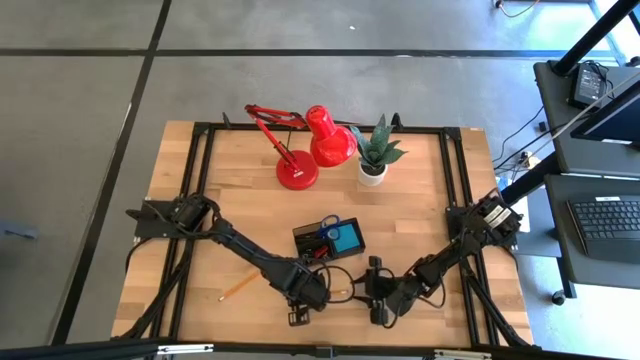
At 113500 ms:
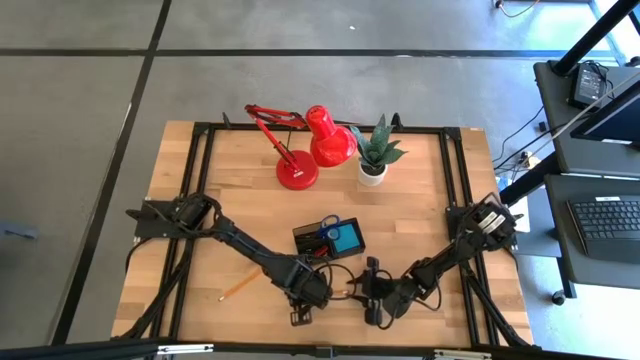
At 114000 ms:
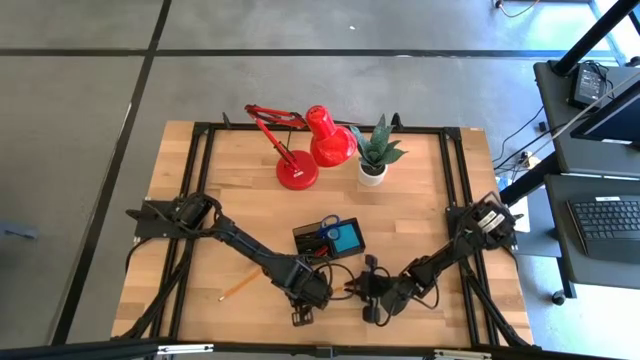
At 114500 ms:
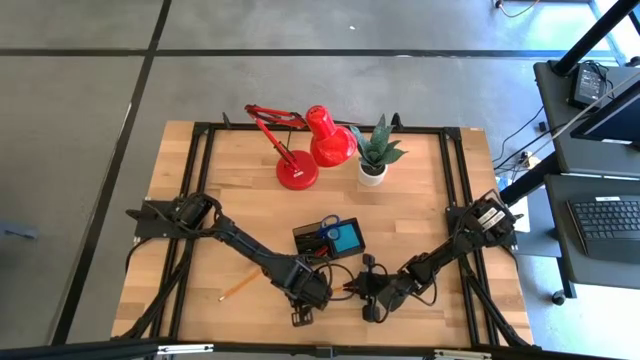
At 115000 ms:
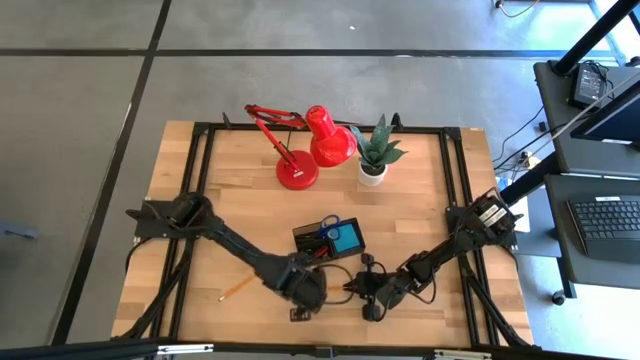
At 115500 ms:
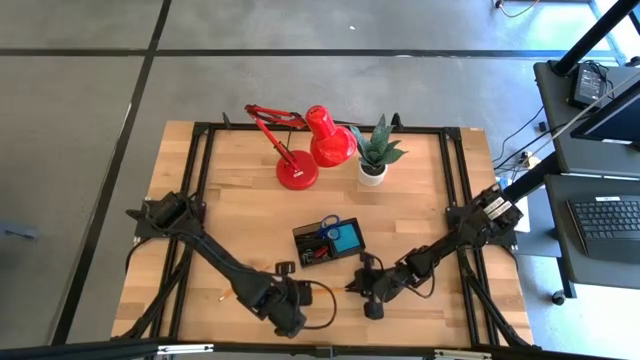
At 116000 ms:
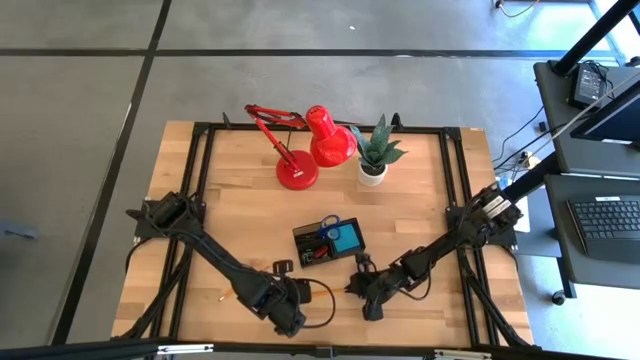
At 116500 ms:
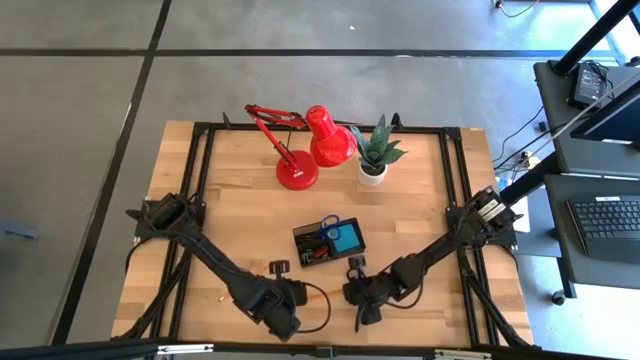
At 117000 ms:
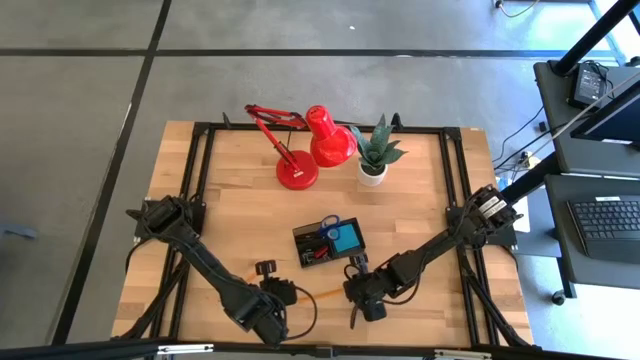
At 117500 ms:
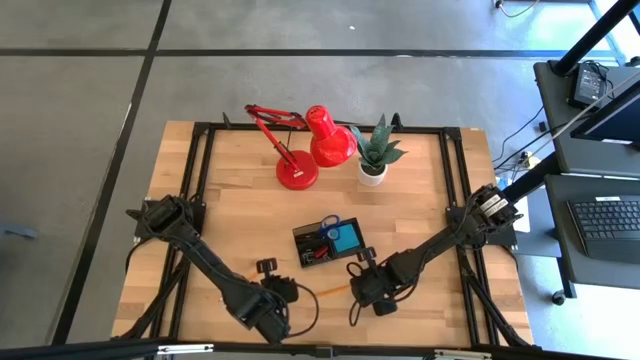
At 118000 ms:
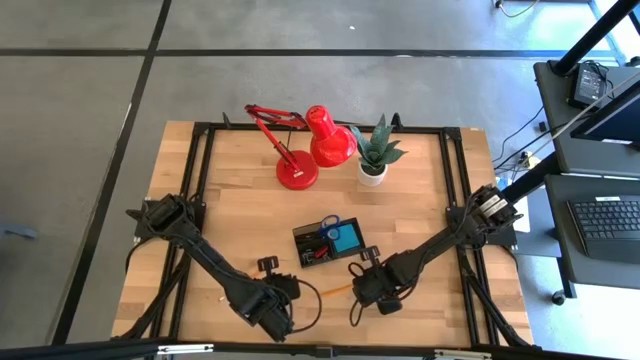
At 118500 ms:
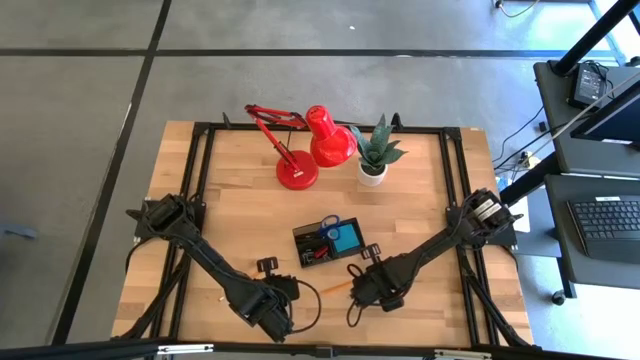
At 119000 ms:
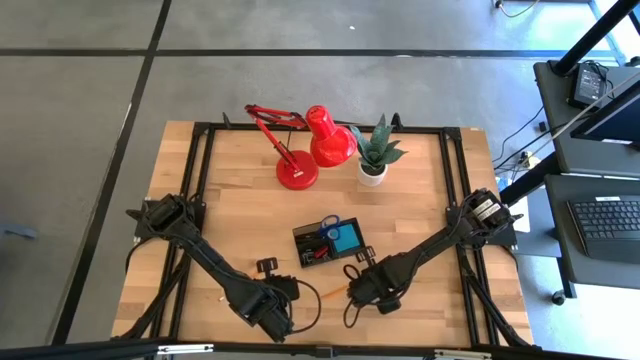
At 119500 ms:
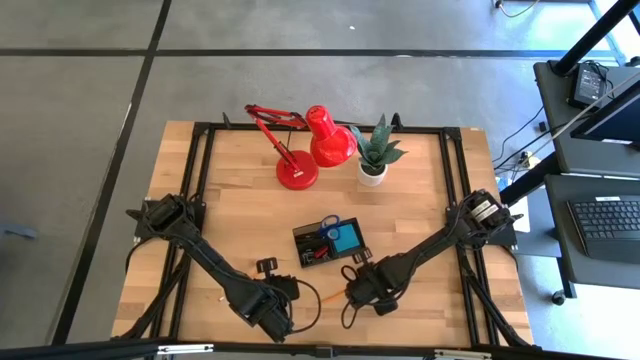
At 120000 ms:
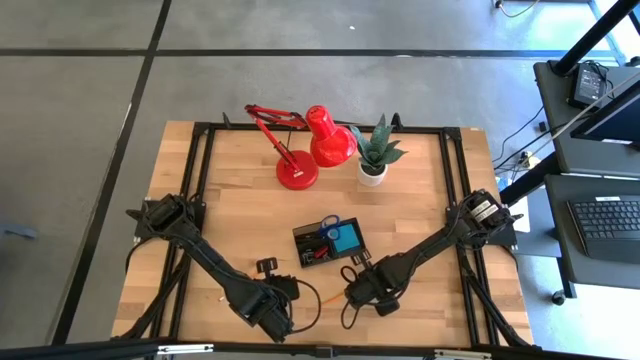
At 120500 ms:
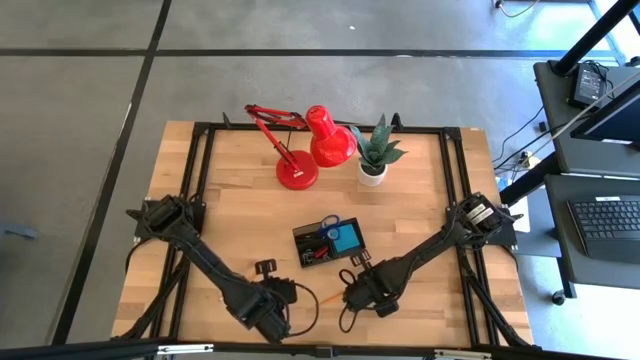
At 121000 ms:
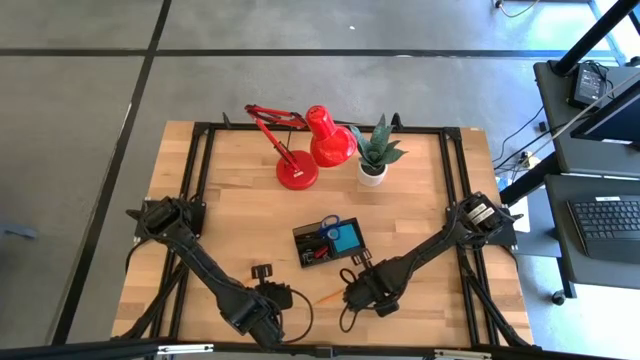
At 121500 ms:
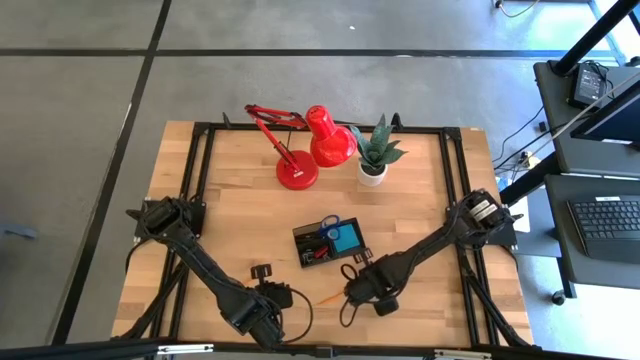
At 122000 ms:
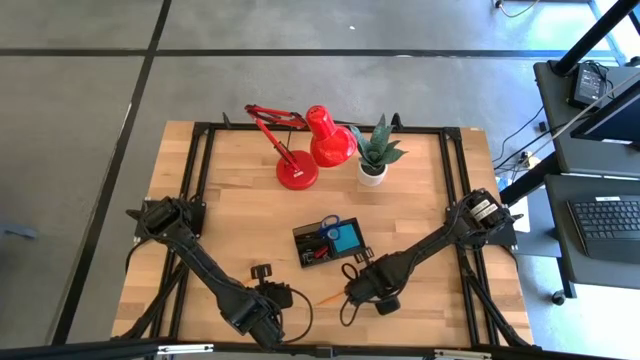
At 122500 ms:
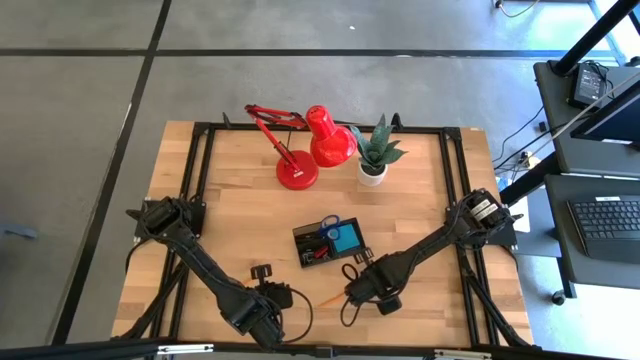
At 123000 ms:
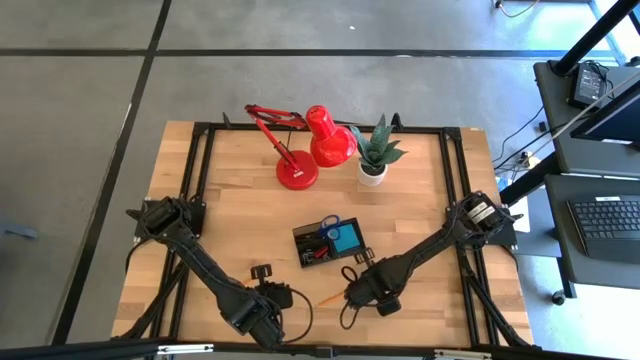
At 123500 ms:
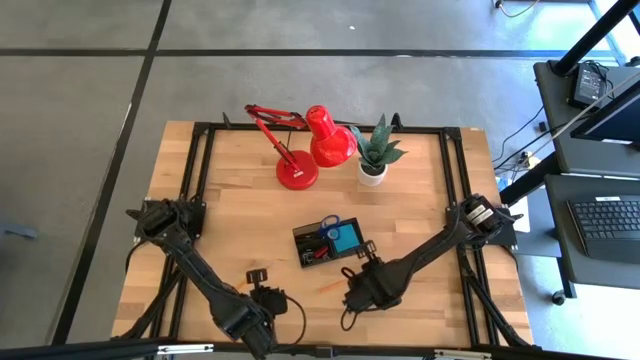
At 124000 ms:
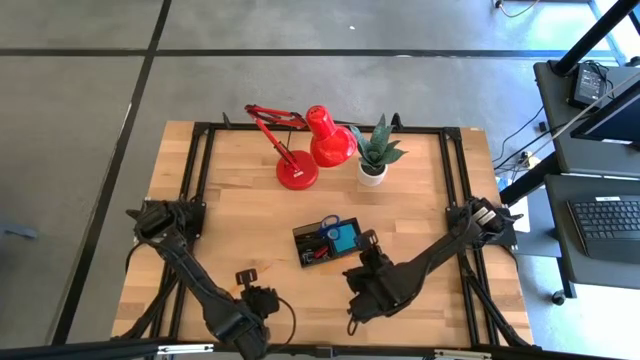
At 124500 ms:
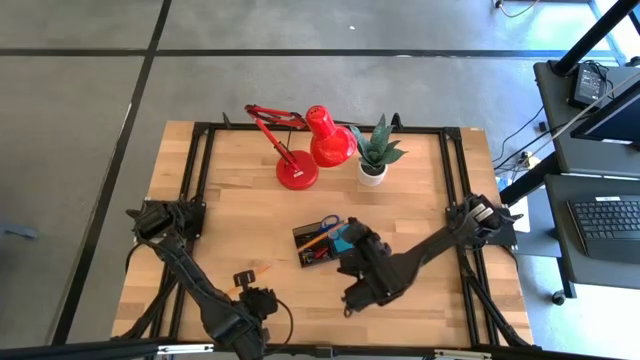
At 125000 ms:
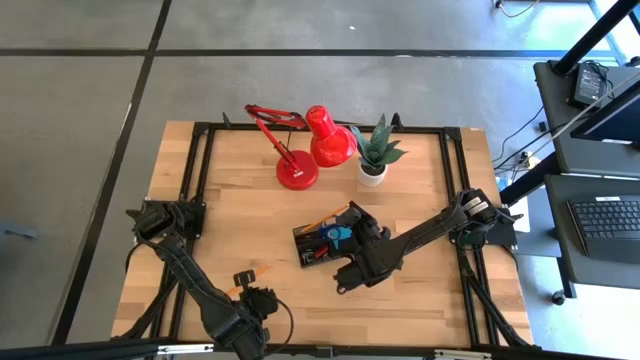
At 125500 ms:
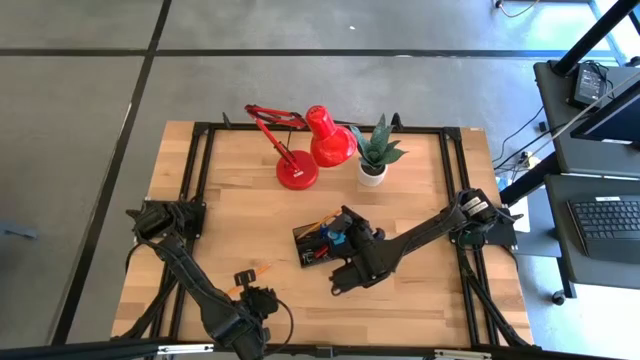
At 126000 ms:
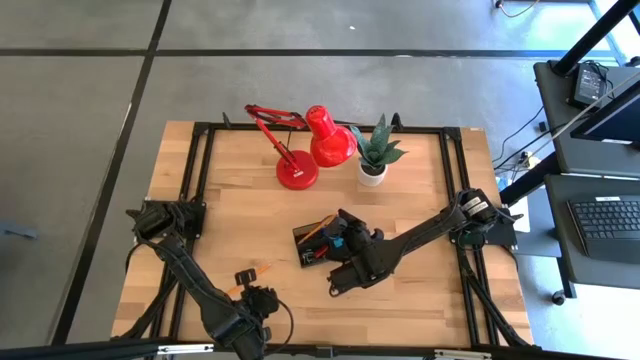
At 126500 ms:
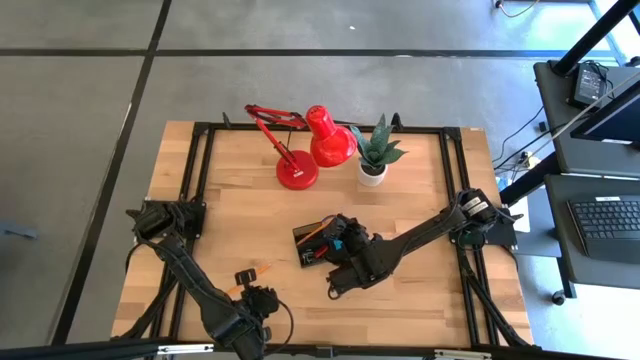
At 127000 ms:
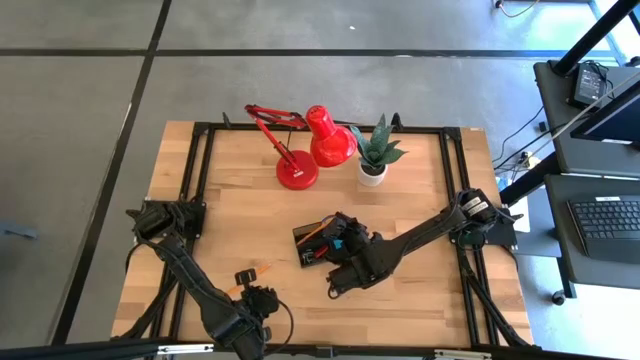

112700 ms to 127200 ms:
Task: Pick and place office supplies into organizer
Put the top yellow pencil into the black desk organizer

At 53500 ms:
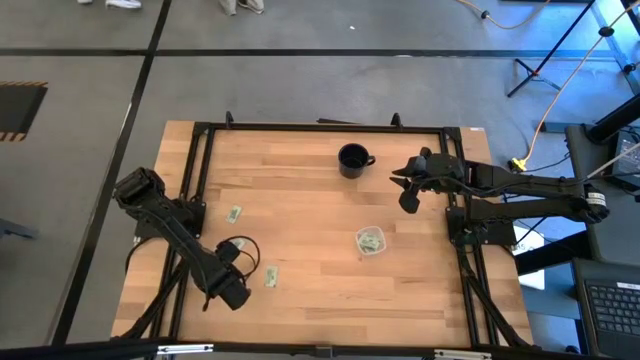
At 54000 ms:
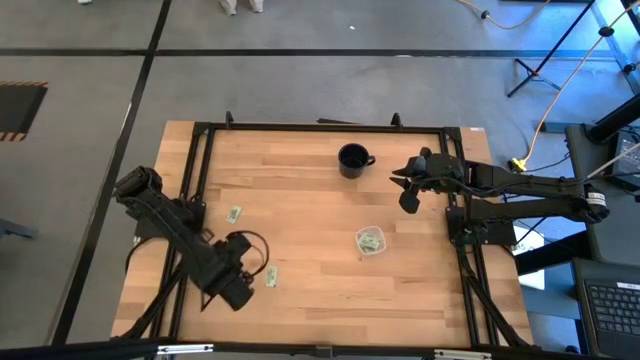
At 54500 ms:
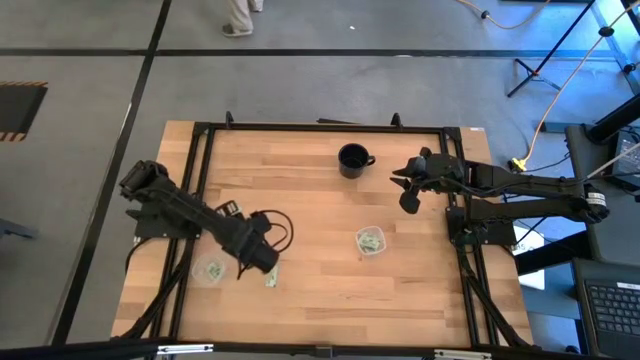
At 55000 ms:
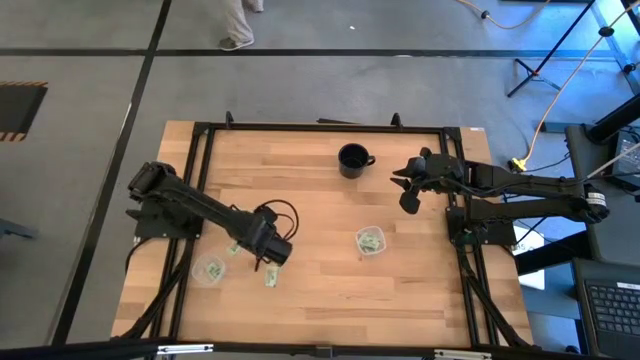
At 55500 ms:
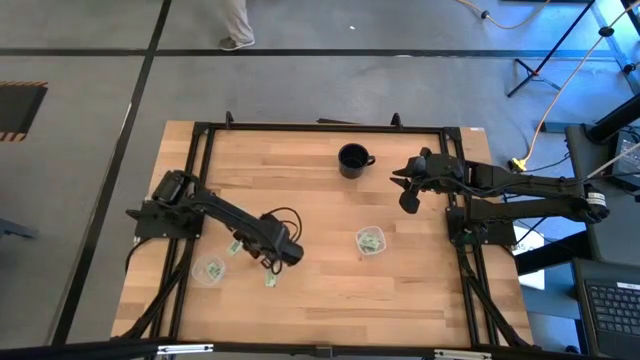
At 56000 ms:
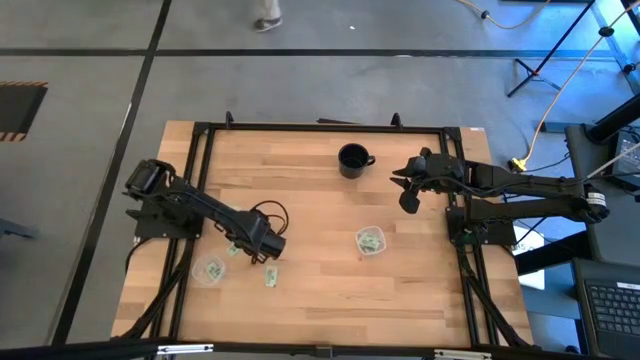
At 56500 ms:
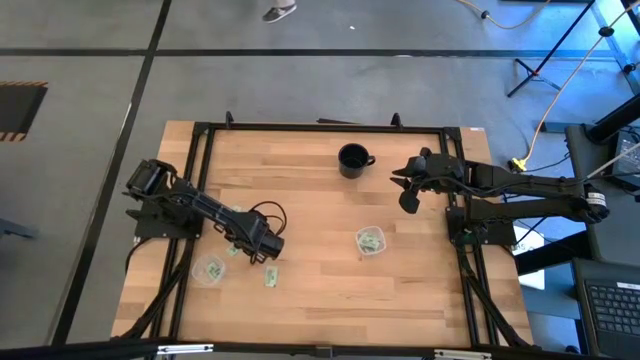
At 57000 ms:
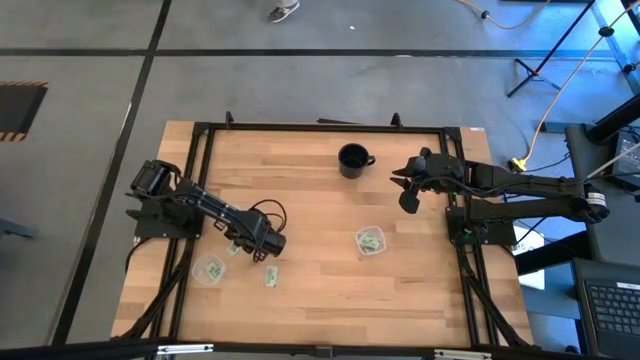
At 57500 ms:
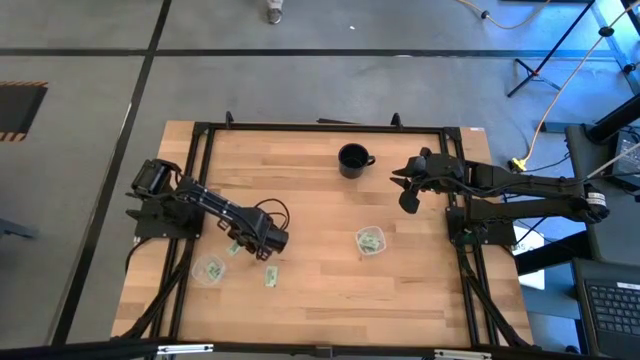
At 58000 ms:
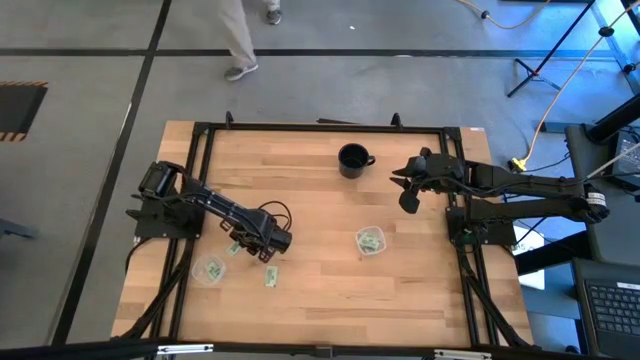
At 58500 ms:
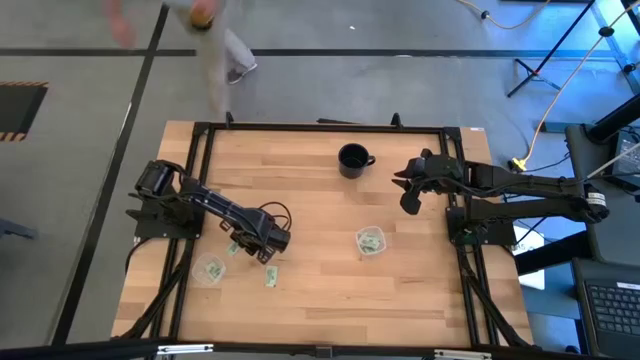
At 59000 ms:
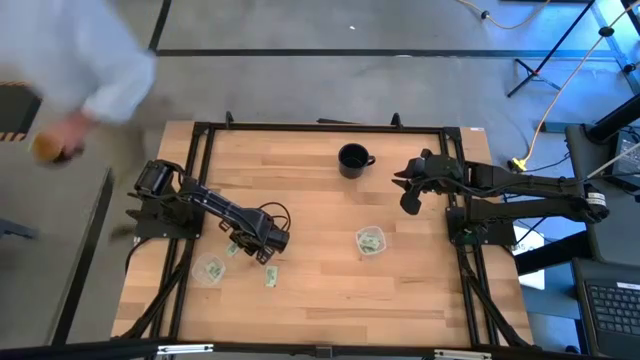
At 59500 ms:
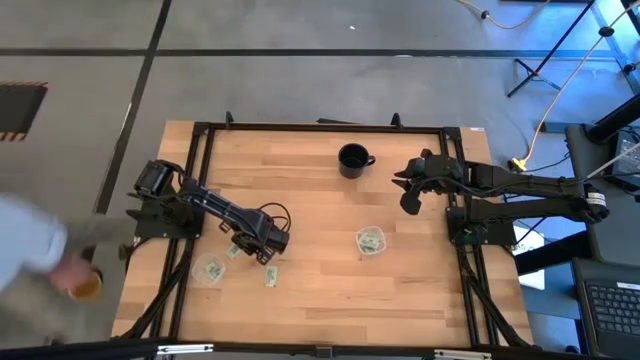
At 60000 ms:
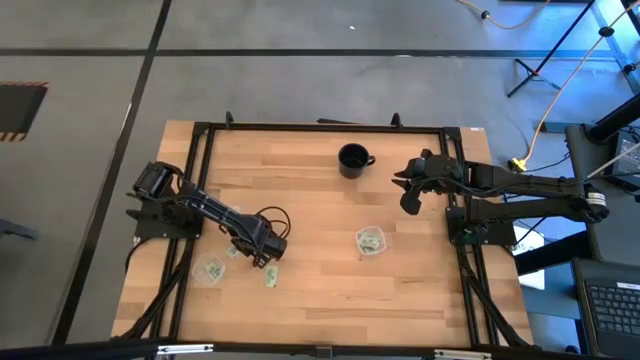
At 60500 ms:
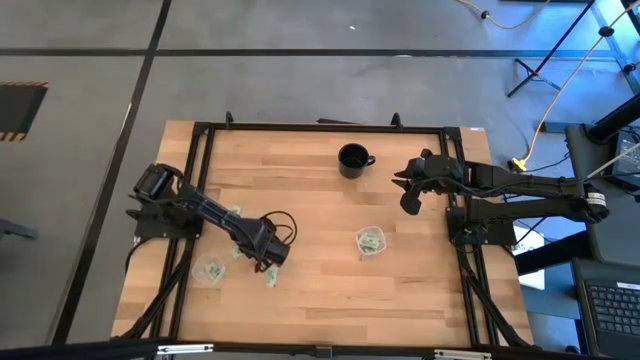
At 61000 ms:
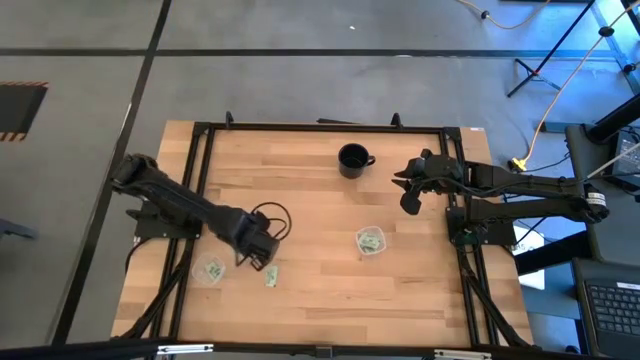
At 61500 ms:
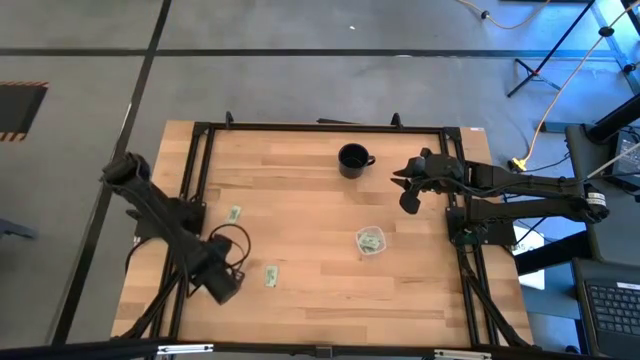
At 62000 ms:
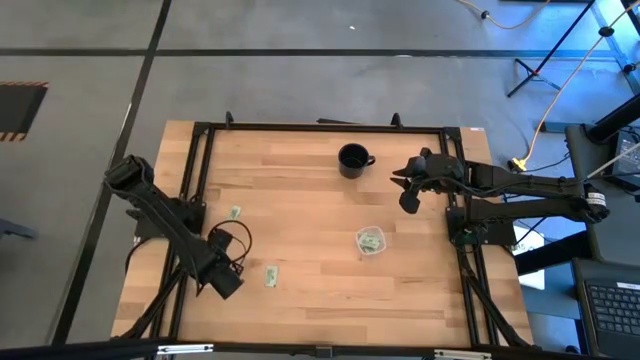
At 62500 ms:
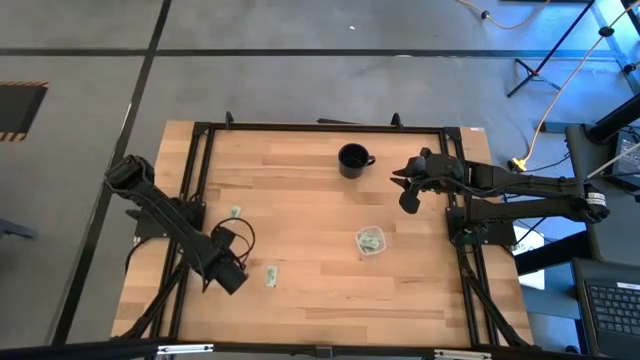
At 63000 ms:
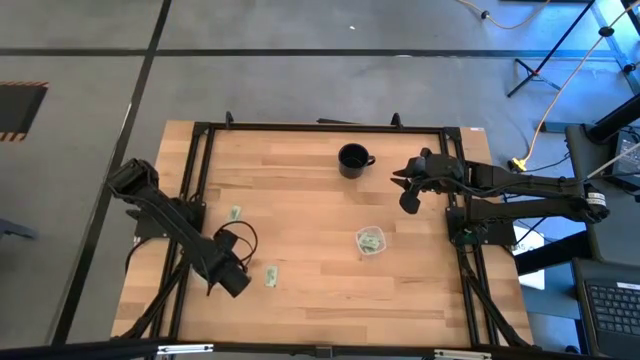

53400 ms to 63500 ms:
Task: Pick and place Stevia / Truvia into bins
Put the middle stevia packet into the left transparent container
